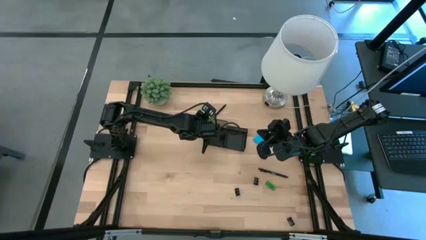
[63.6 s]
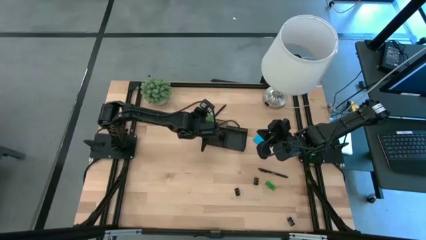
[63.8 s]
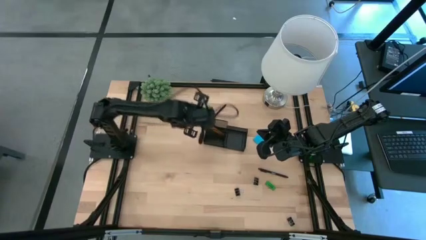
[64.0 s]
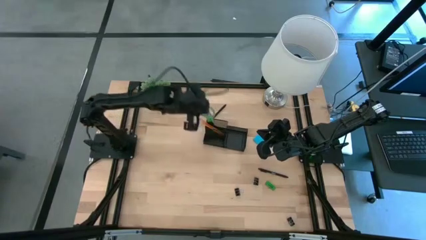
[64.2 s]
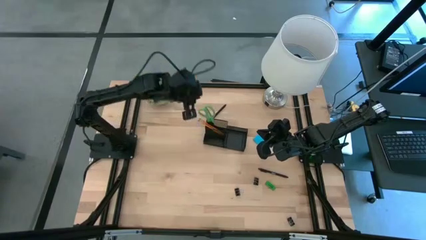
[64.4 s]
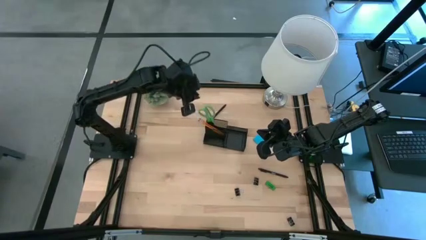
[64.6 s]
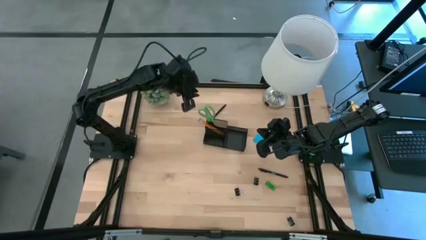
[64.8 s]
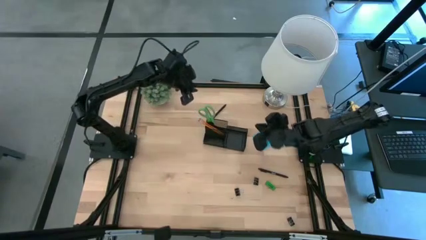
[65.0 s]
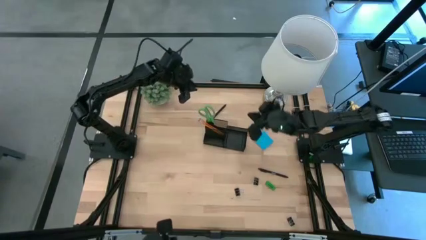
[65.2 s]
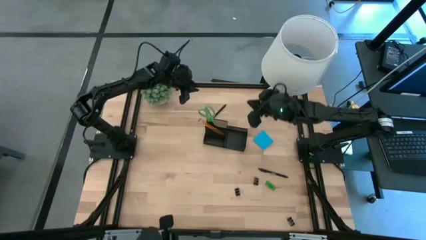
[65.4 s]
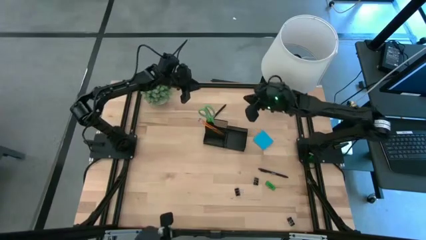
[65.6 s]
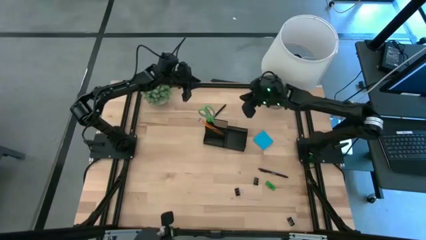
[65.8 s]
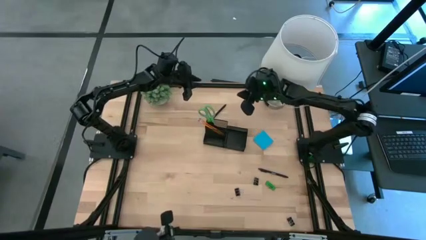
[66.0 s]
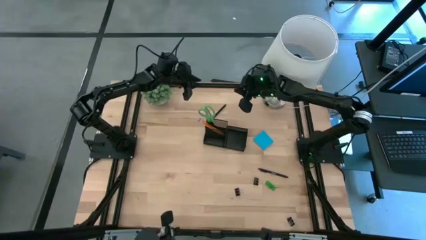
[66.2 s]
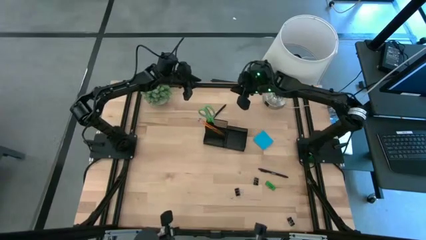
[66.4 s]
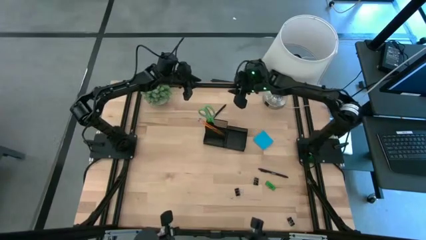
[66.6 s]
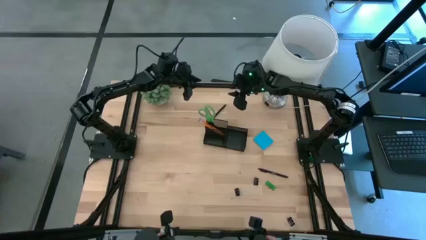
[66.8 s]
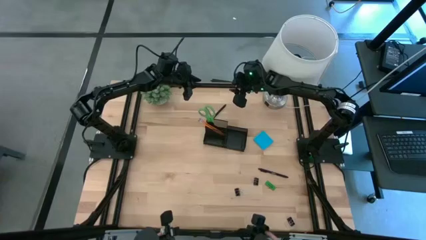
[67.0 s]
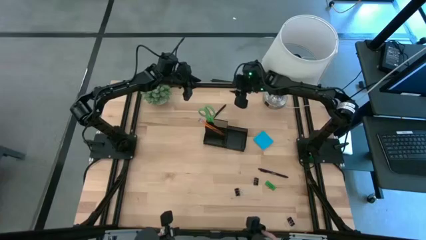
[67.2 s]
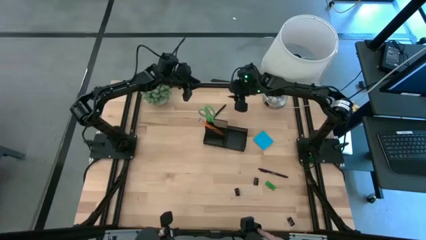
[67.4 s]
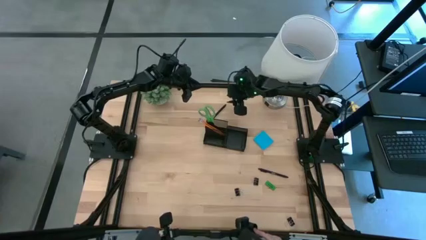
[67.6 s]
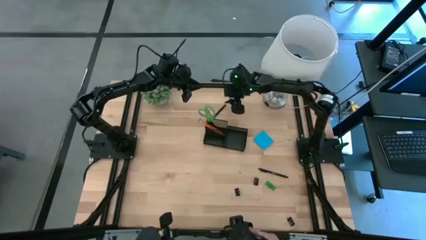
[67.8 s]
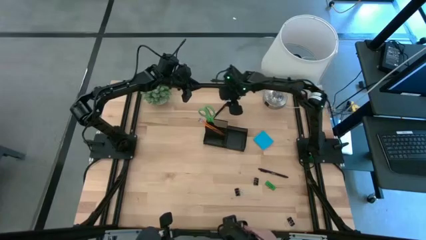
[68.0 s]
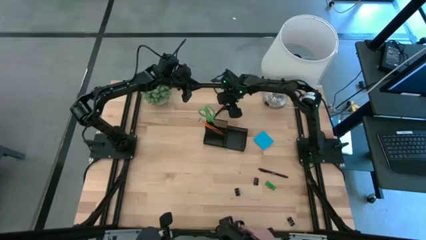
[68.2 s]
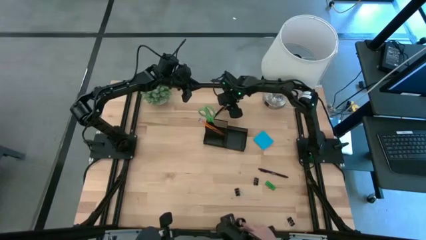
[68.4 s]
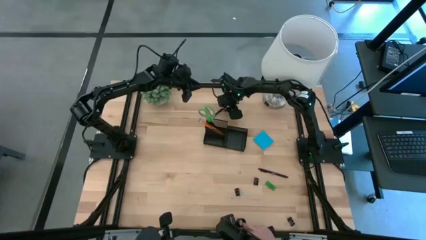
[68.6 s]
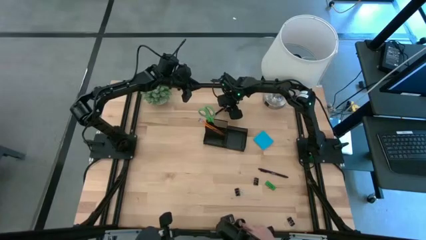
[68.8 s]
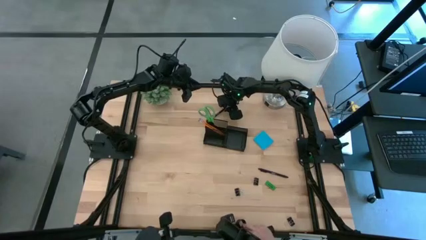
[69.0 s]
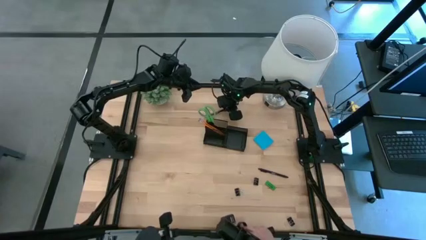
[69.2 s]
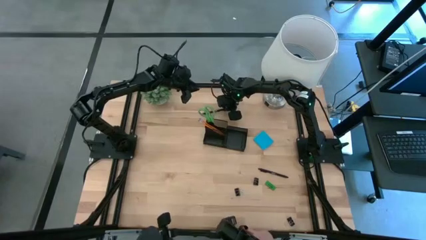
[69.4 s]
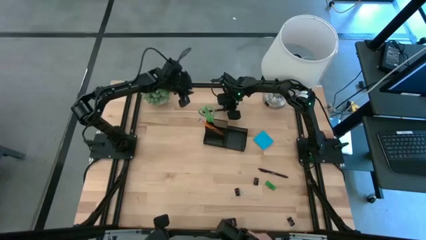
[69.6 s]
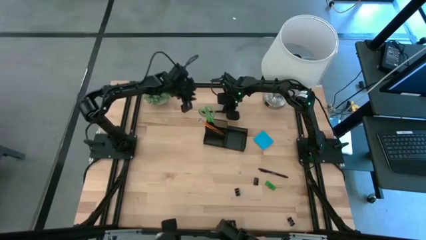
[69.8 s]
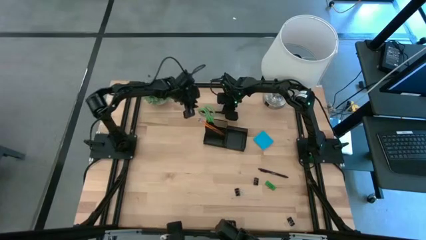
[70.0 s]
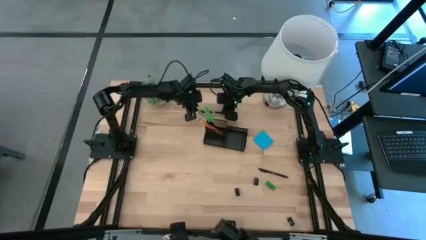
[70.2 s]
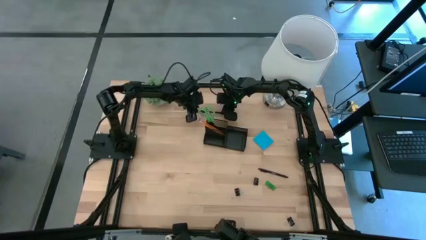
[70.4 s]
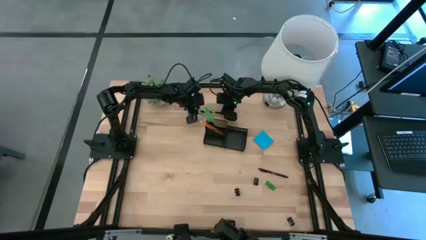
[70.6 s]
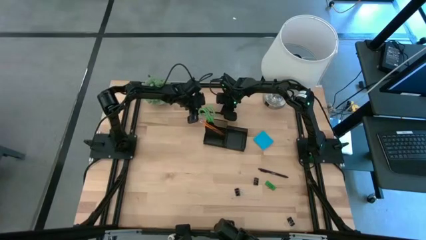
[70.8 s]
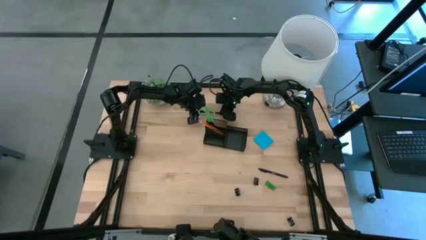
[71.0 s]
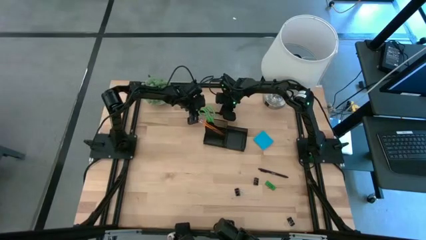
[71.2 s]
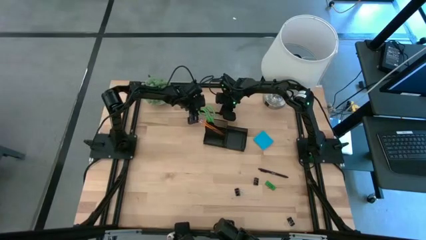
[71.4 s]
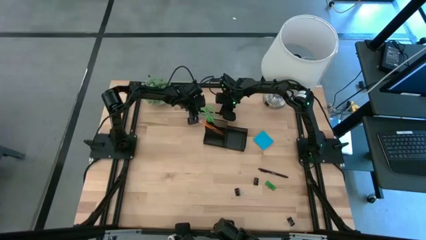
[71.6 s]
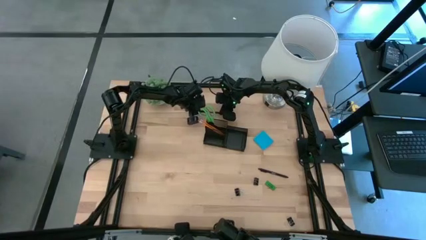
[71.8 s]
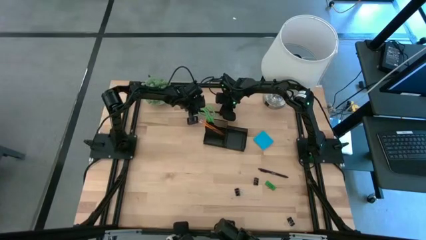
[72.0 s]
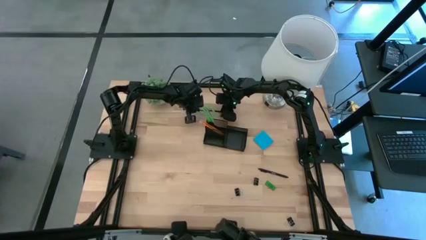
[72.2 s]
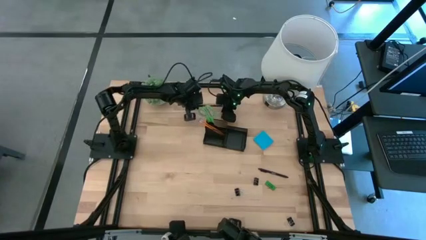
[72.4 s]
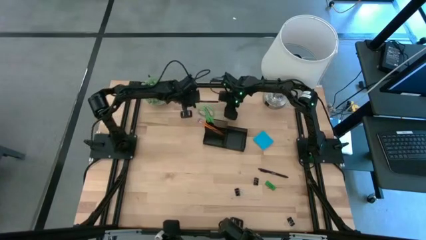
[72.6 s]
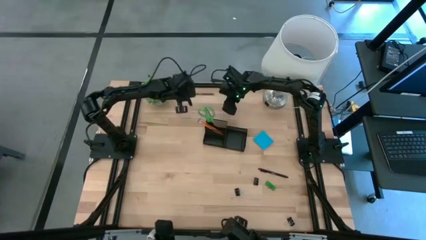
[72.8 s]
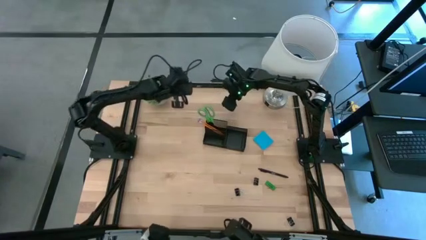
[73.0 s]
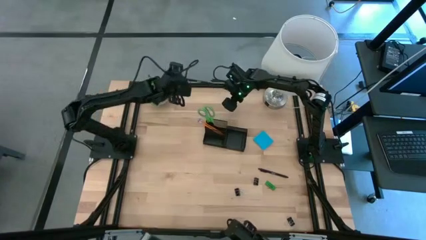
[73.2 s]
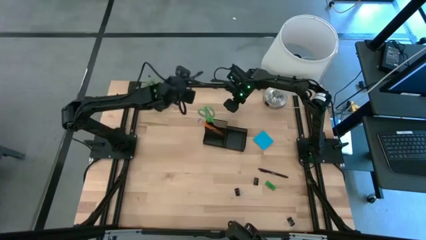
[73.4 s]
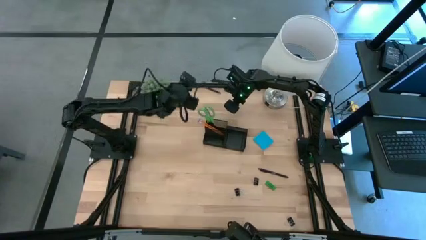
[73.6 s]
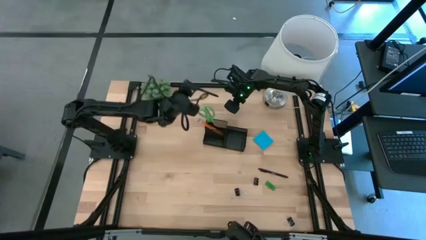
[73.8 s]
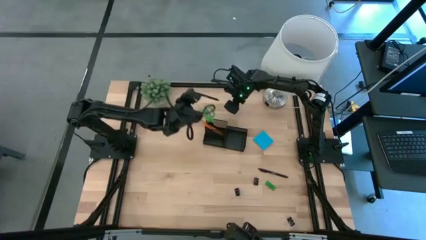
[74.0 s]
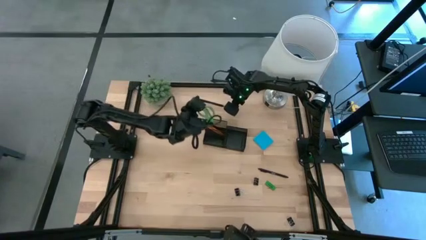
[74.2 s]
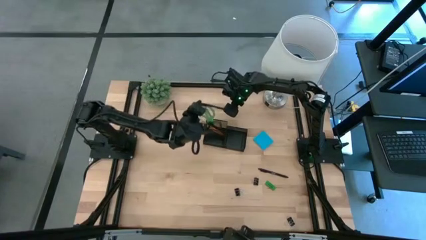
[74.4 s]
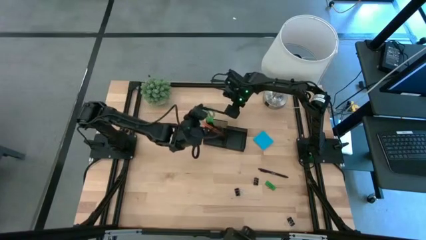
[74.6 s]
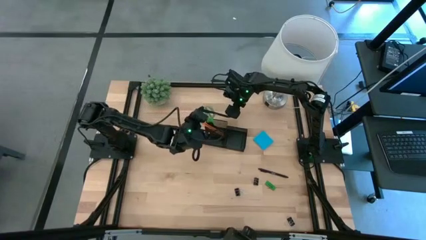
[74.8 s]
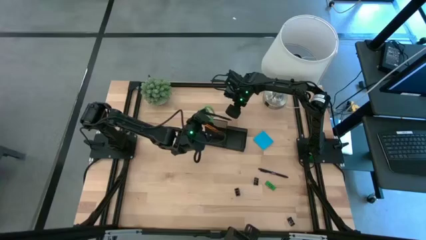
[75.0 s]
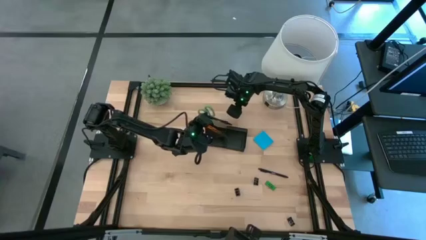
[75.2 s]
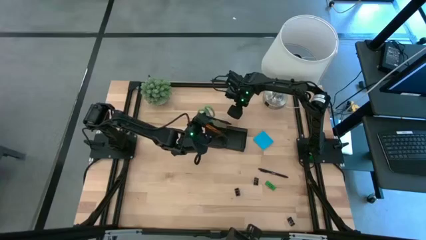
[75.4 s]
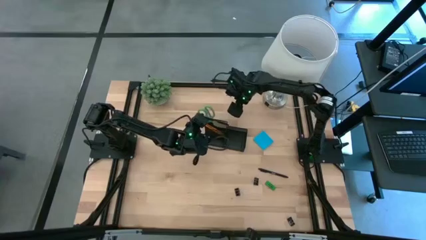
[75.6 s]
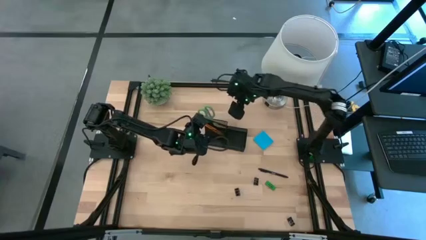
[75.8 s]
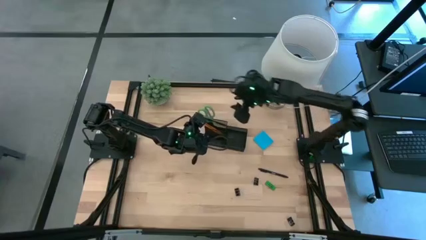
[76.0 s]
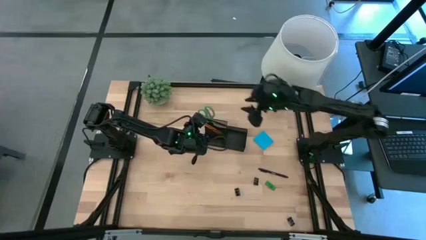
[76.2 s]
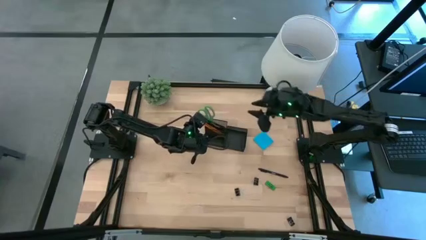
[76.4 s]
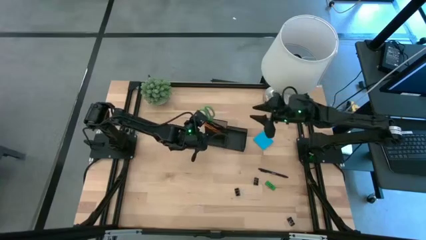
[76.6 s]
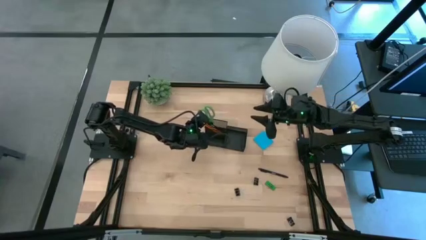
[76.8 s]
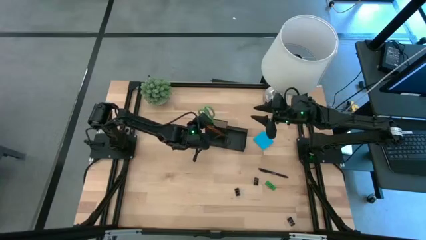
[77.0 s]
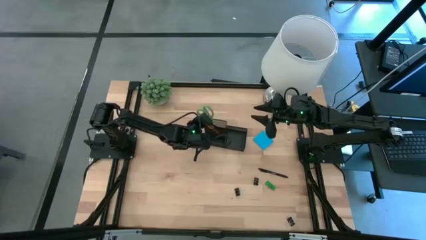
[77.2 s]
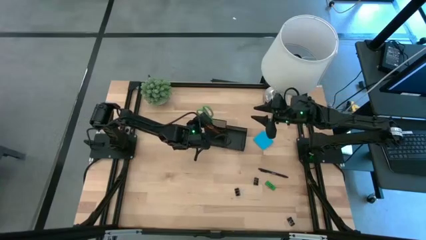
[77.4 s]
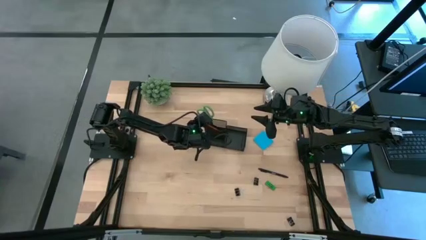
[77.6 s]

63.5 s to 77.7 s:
Task: Pick and place office supplies into organizer
Put the top black pen into the black organizer

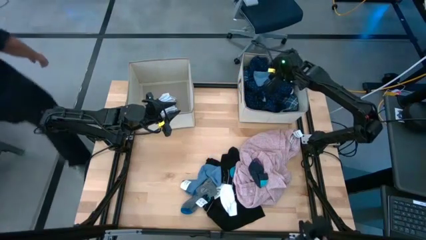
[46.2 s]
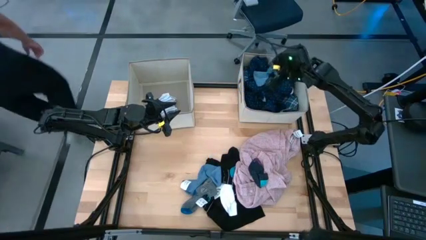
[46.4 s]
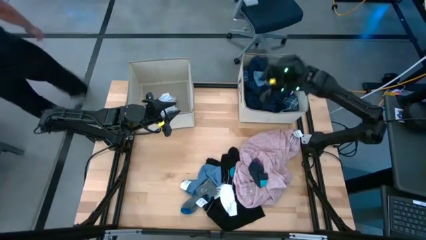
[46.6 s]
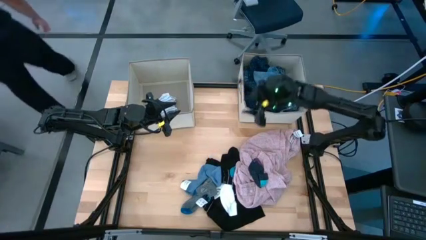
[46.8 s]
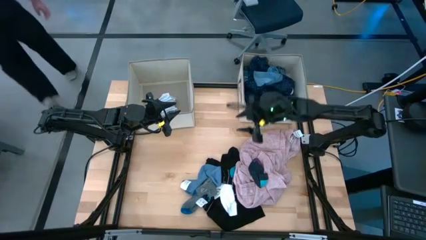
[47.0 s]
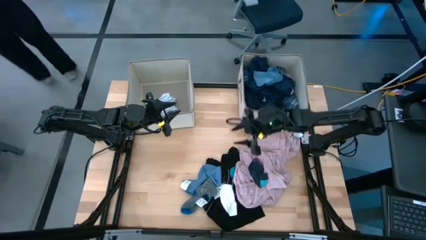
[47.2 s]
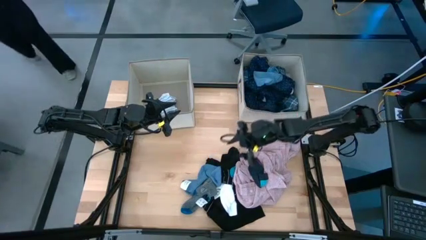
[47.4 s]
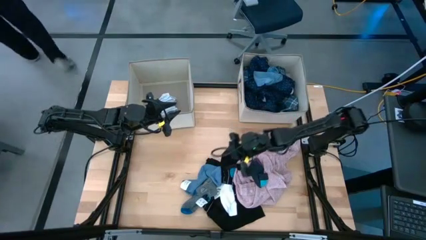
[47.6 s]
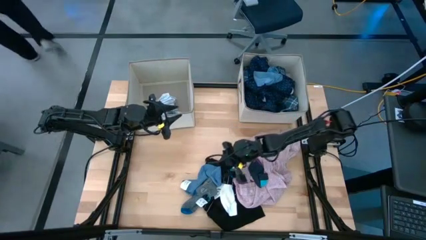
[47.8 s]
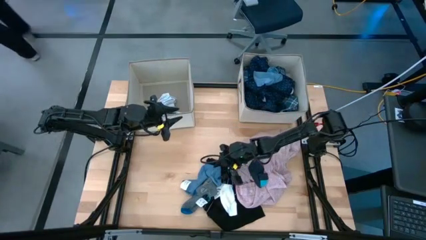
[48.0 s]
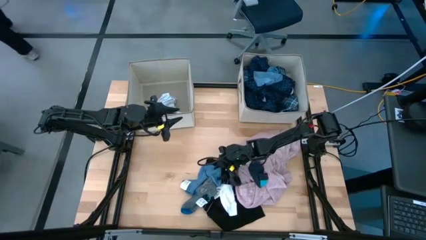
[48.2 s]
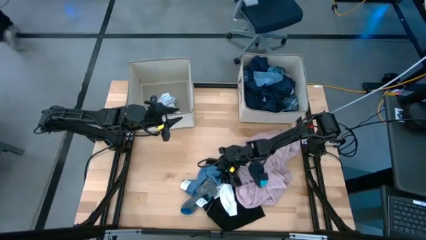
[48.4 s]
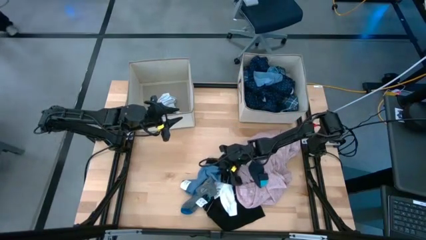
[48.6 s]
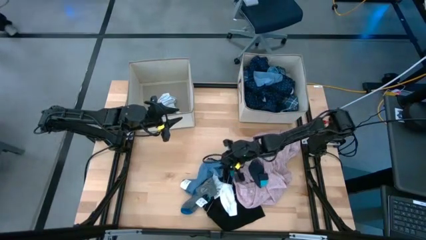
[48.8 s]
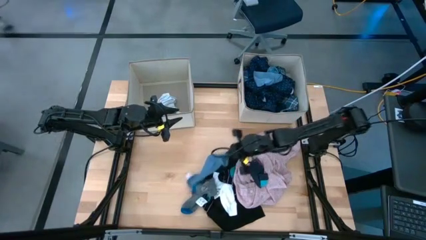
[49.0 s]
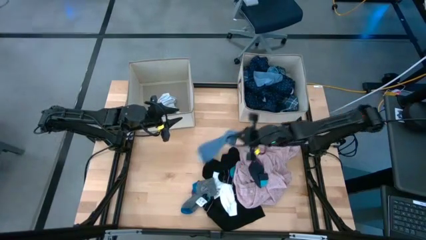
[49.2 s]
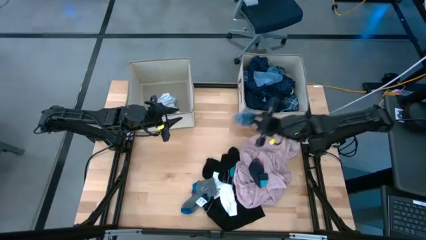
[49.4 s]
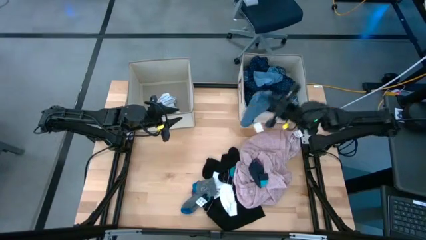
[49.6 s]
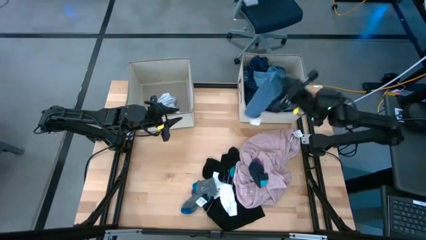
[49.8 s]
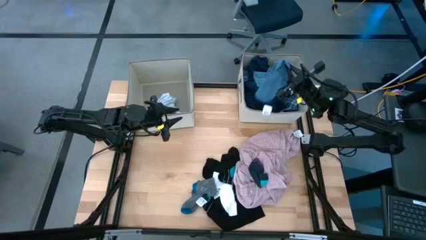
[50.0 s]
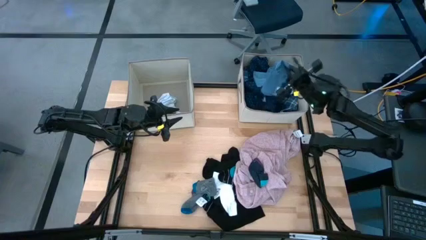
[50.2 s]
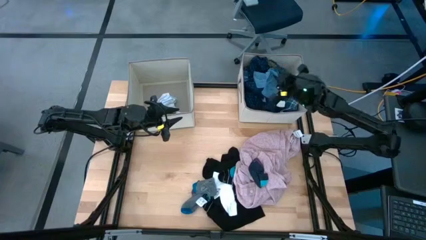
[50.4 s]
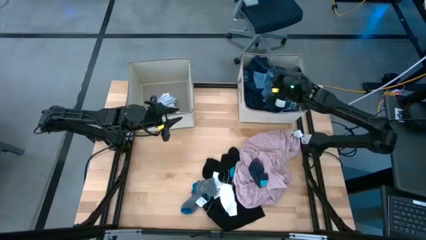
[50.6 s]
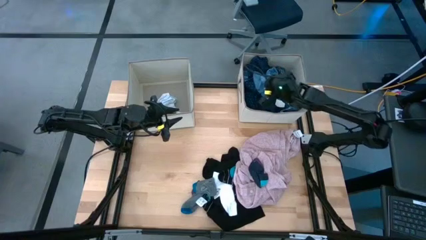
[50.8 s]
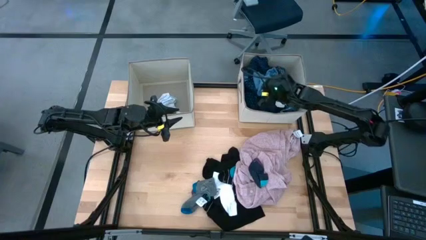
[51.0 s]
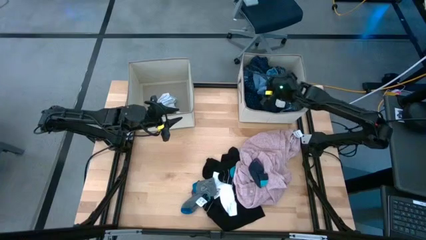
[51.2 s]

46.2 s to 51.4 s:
Task: Sort clothes
Put the blue sock into the right laundry bin
